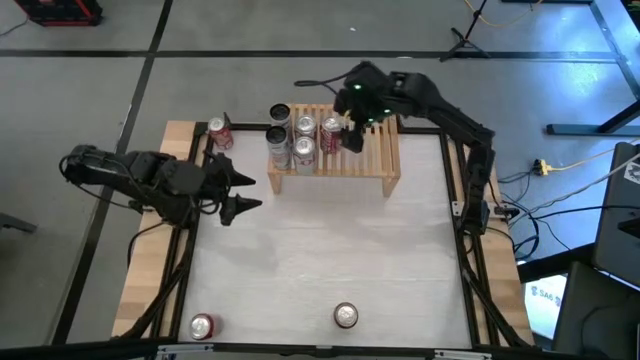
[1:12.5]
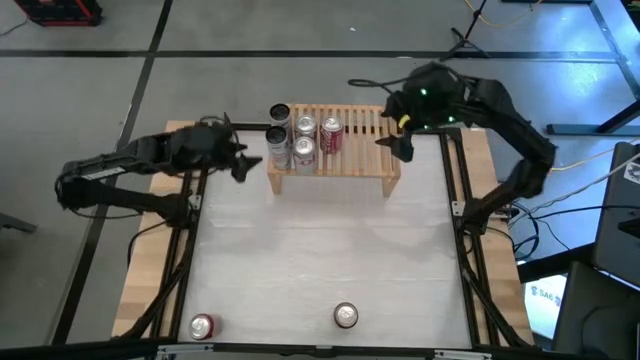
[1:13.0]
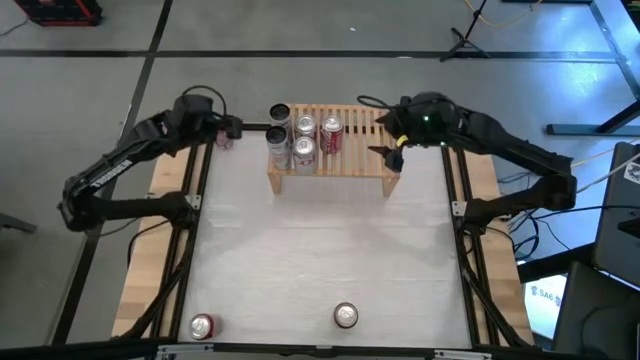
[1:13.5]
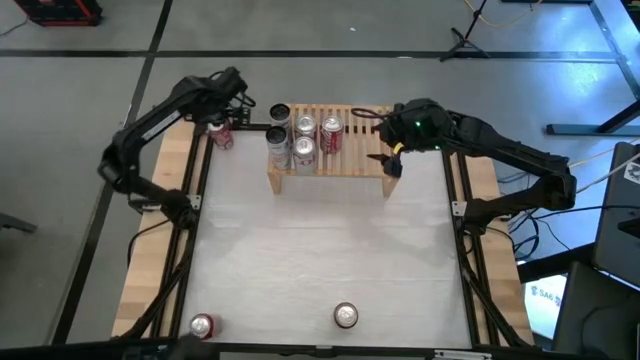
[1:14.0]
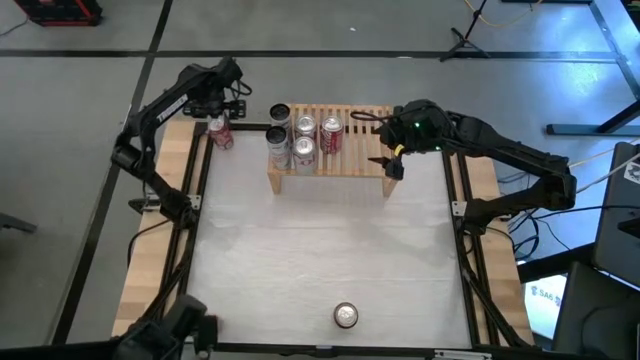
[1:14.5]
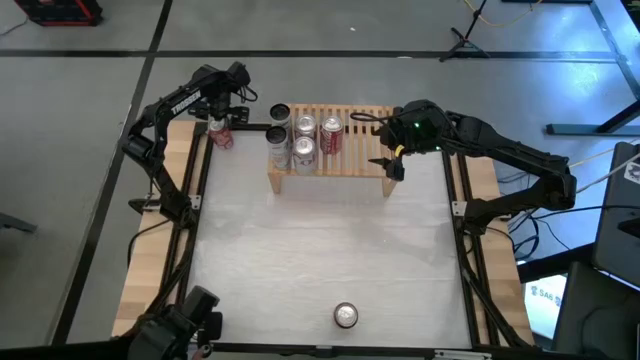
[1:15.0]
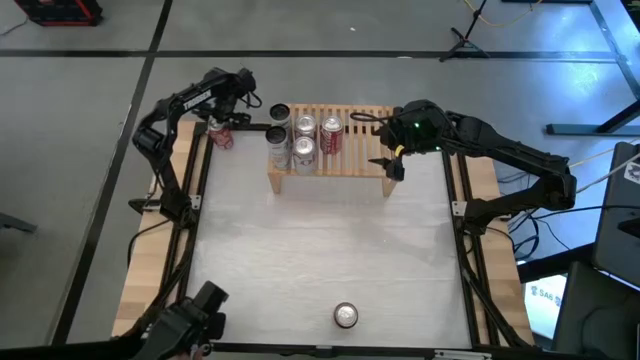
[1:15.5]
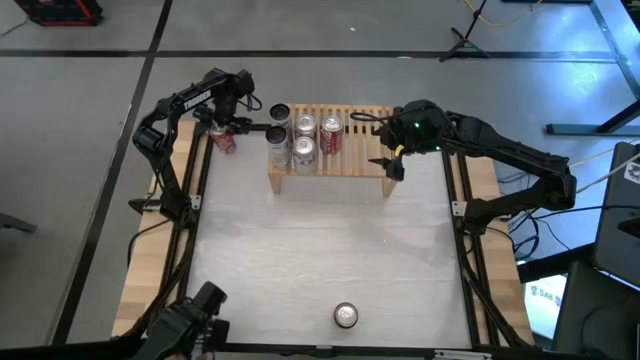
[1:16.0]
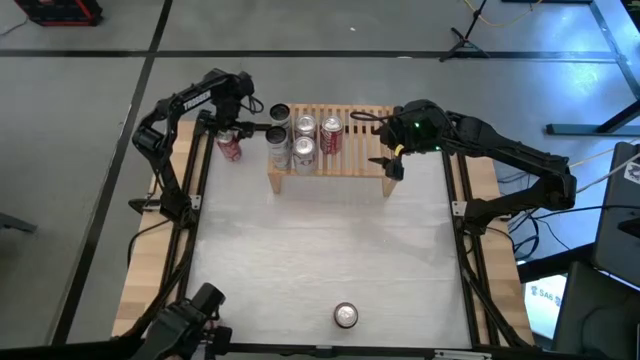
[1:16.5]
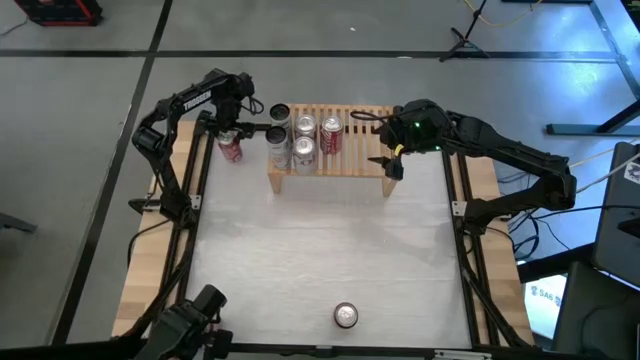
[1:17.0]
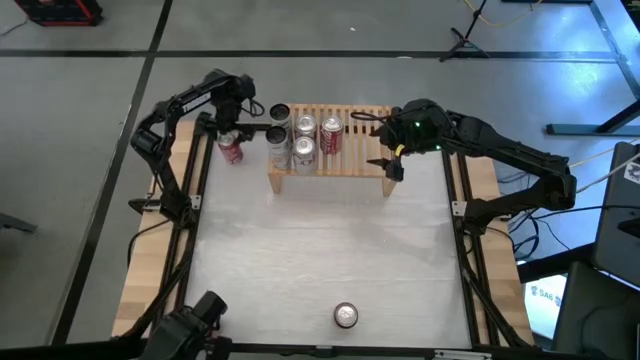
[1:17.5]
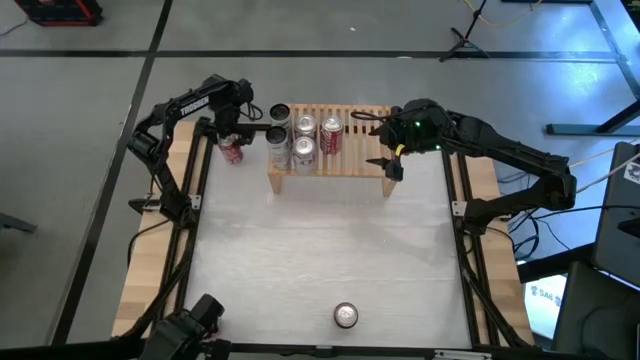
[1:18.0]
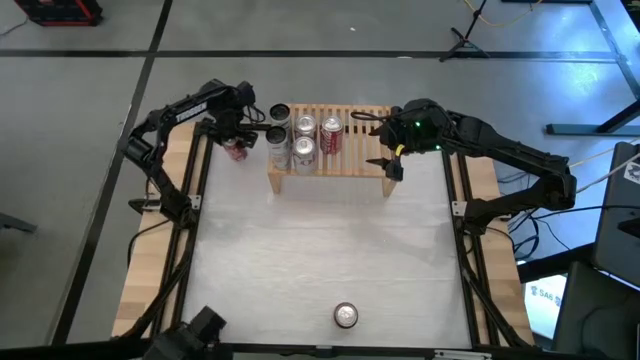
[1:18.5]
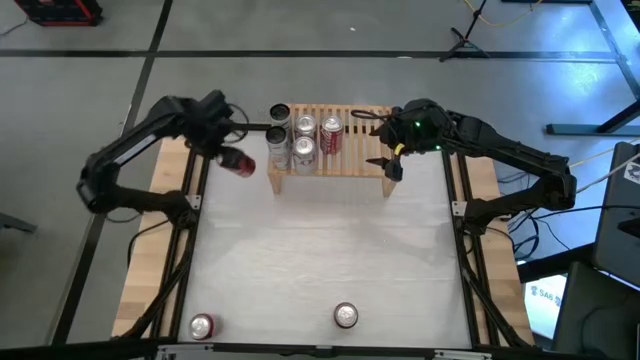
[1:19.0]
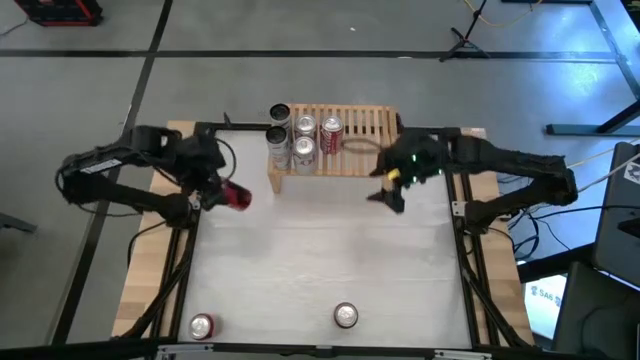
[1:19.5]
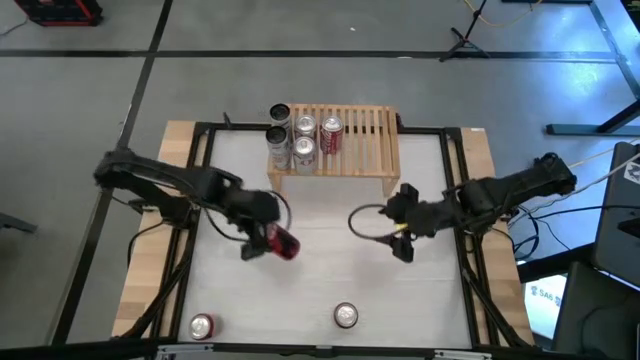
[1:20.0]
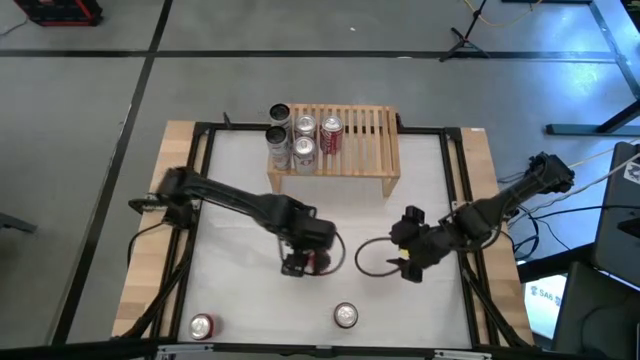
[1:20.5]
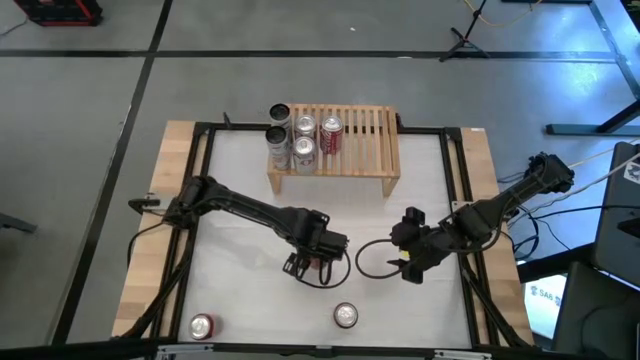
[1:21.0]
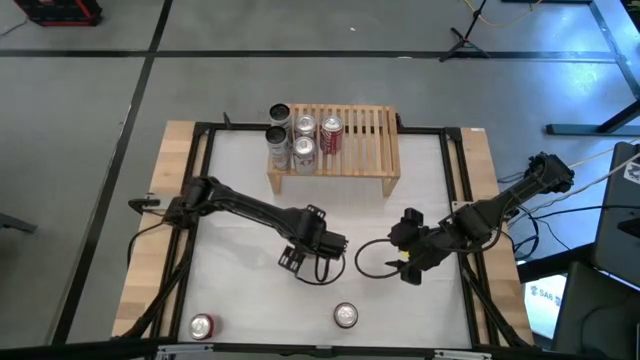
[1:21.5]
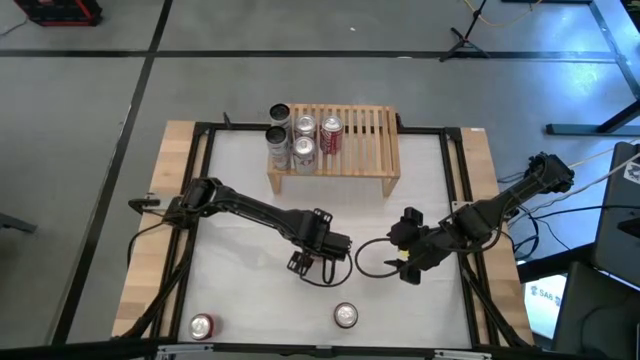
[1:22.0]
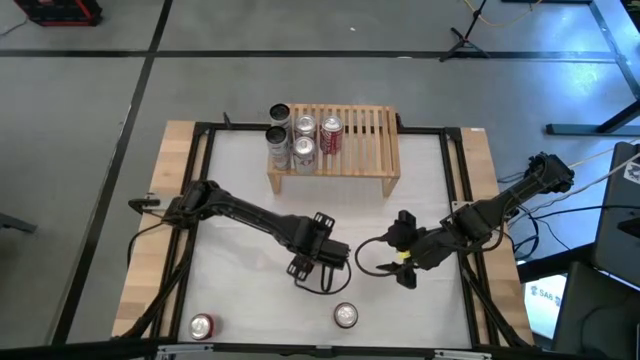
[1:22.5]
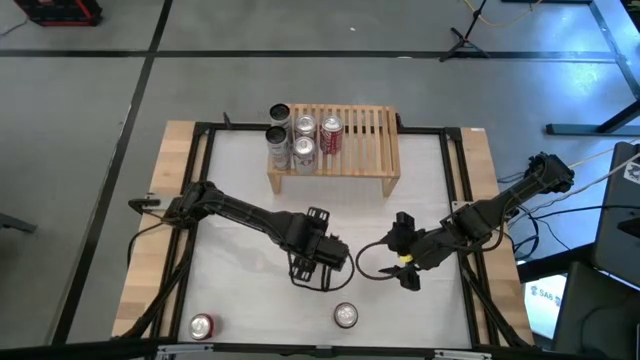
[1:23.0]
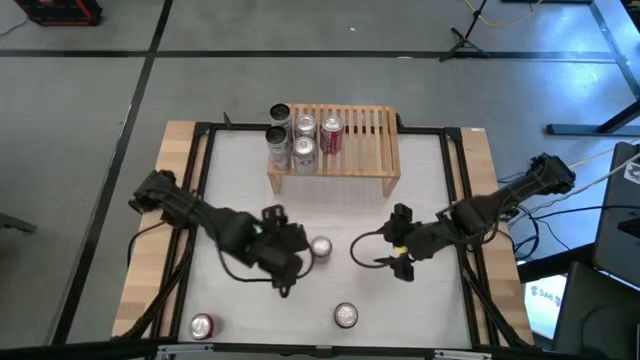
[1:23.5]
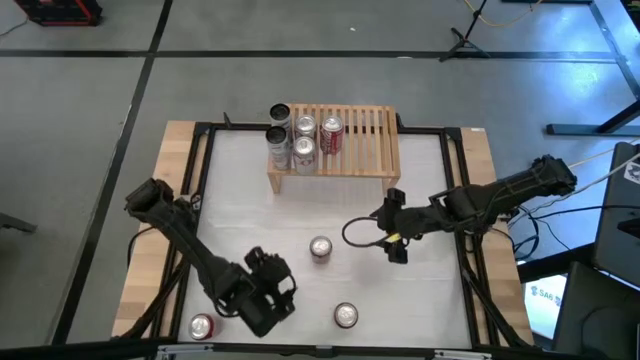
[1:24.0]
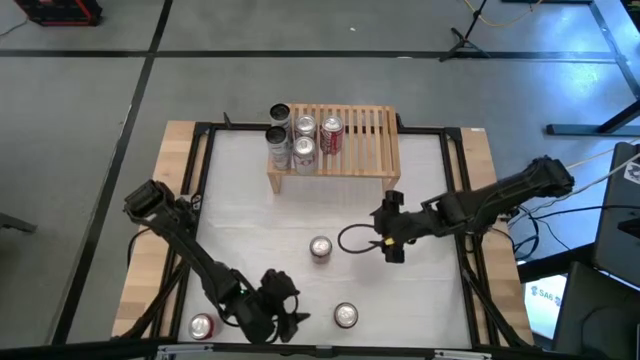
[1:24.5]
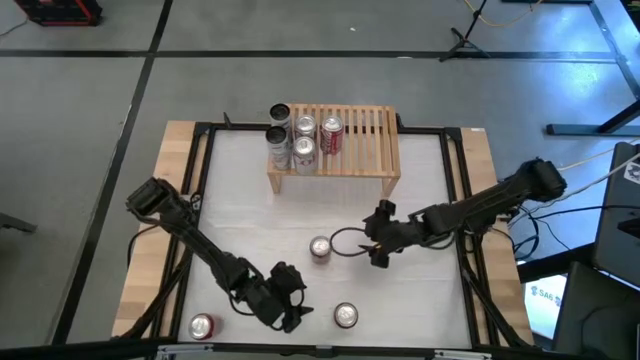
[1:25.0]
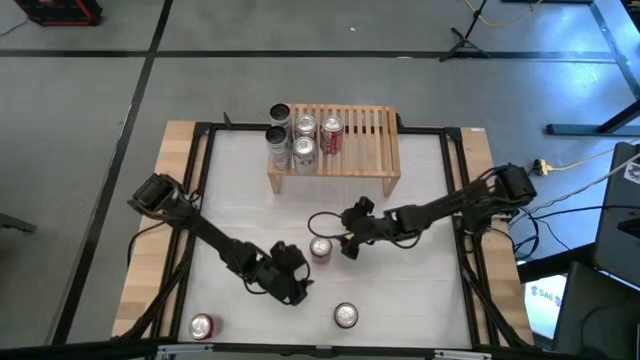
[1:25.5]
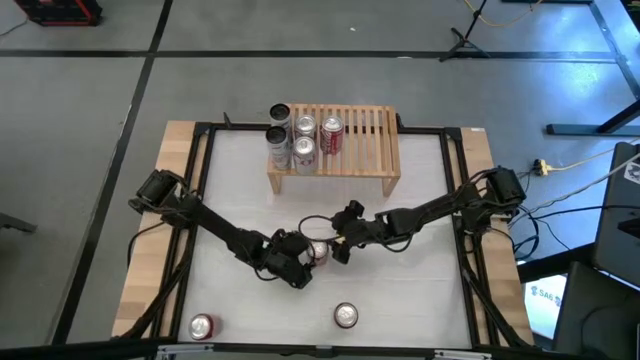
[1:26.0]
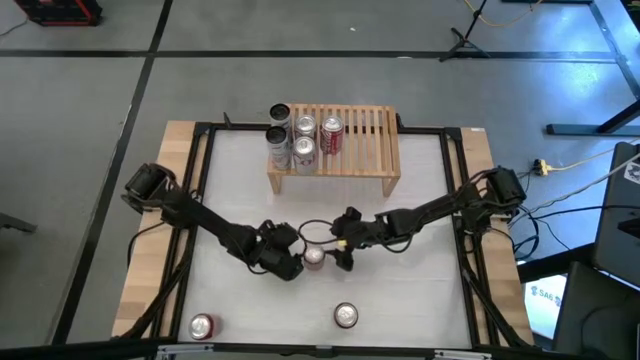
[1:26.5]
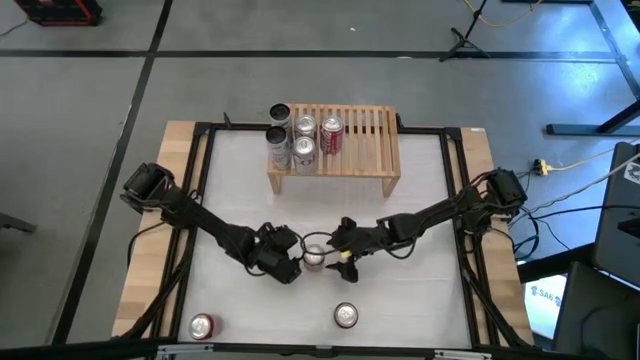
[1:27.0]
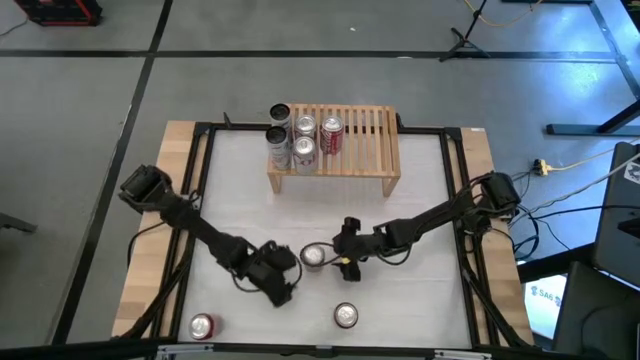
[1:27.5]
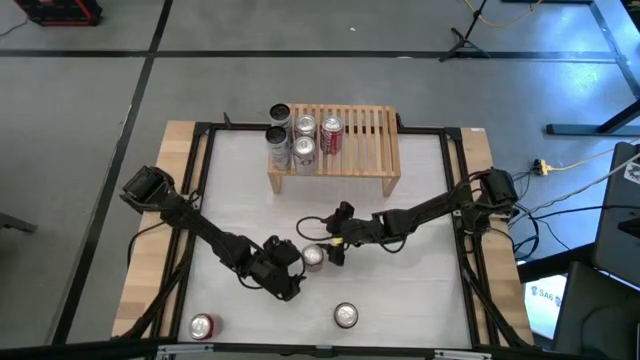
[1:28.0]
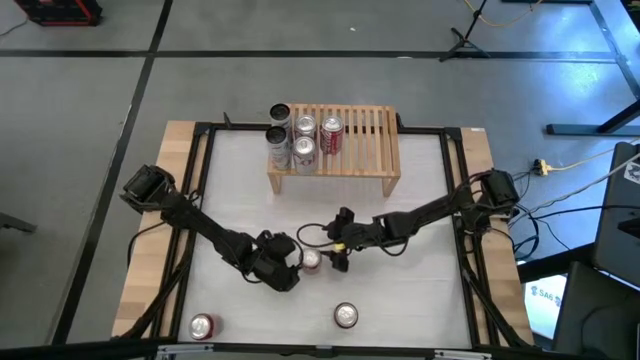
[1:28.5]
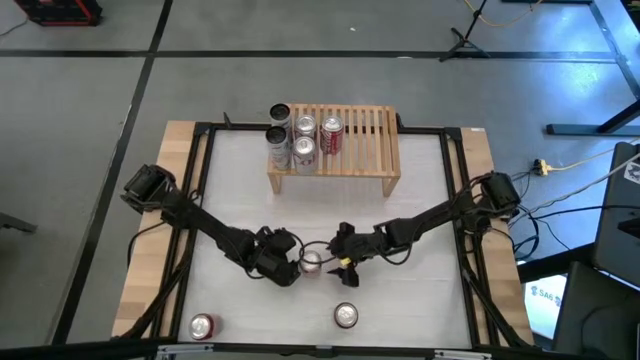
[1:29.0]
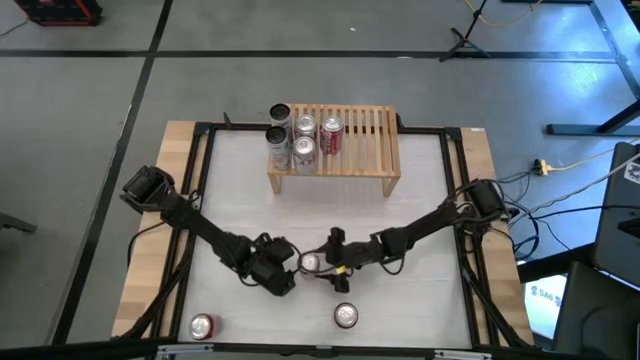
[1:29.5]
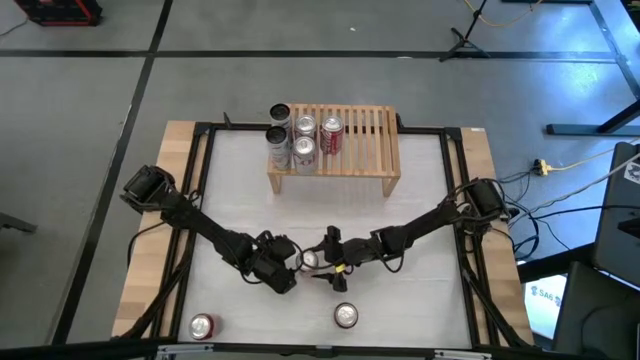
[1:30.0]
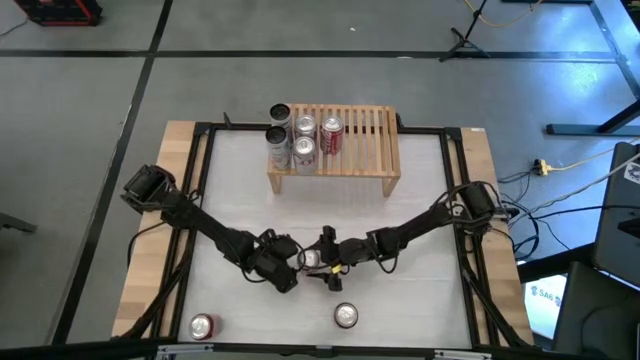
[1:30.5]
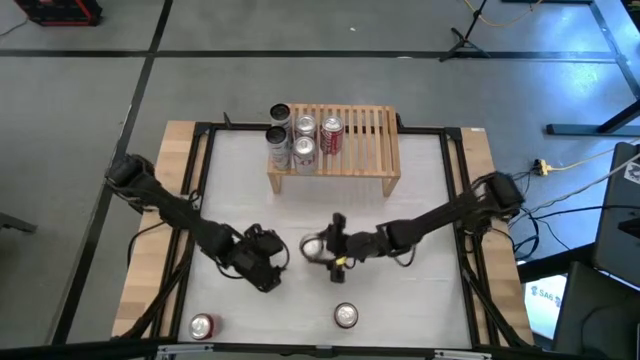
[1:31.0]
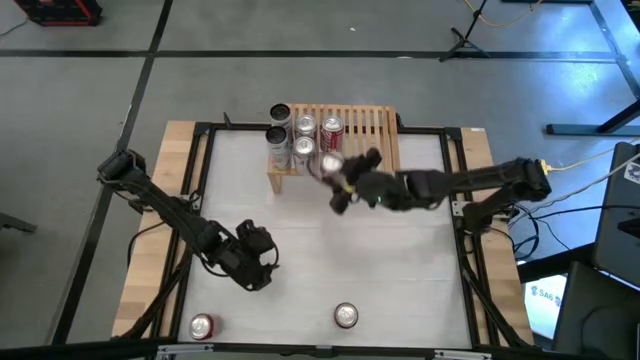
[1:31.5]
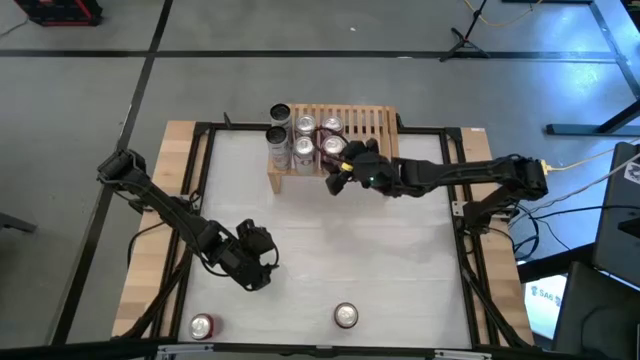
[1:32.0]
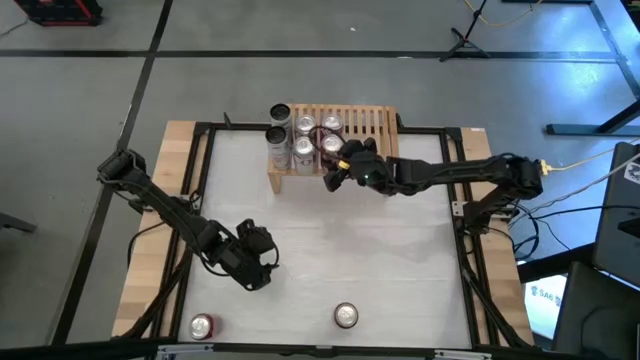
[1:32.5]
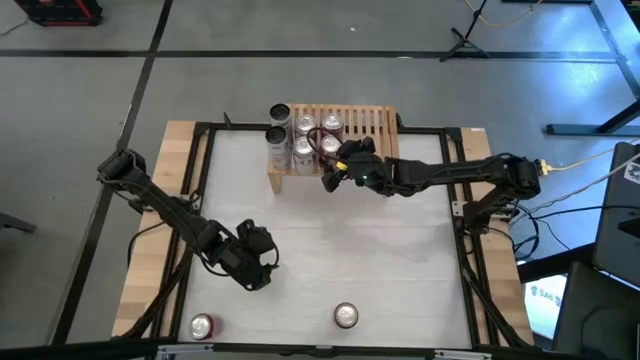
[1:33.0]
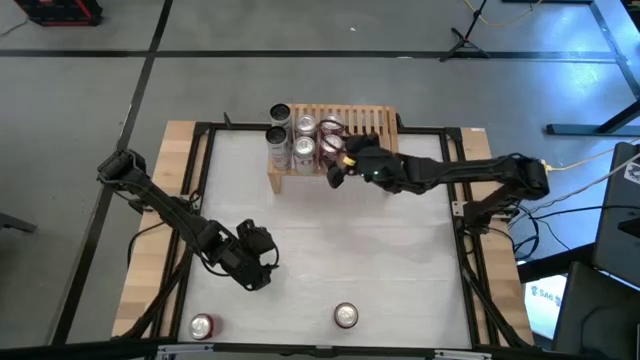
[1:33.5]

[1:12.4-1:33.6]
Task: Place canned beverage on shelf
Put the red soda can on the shelf

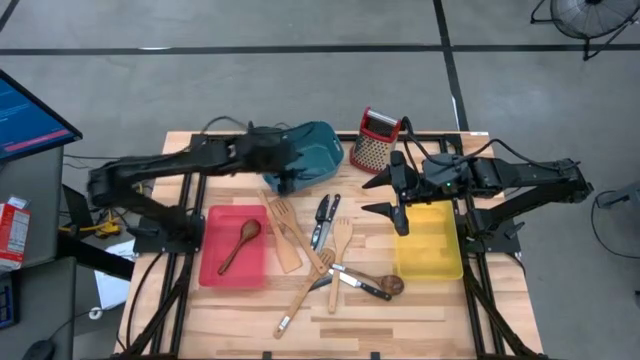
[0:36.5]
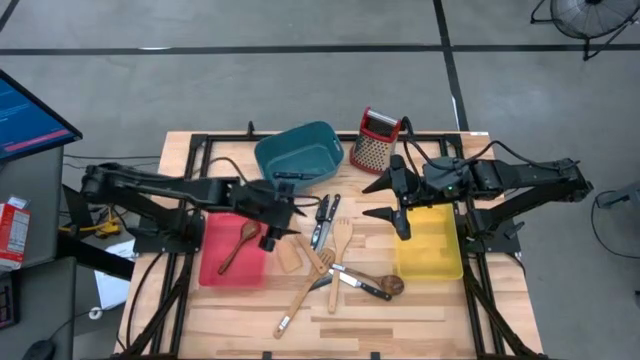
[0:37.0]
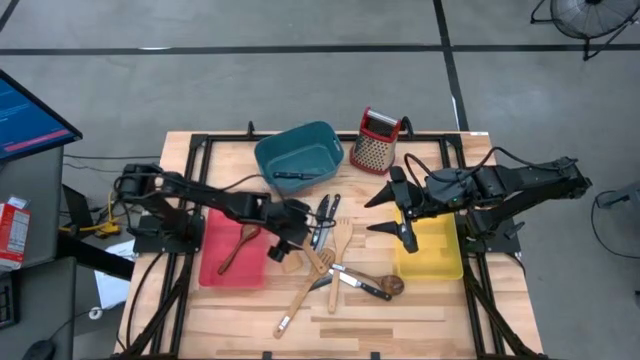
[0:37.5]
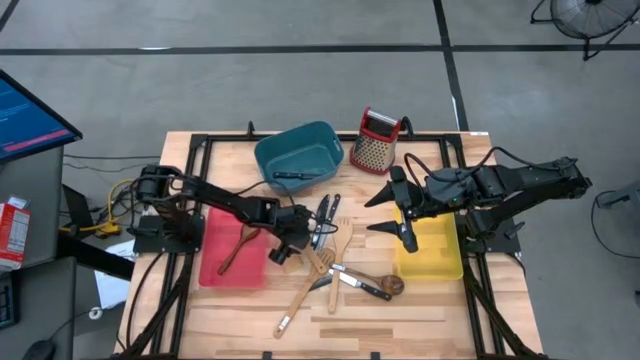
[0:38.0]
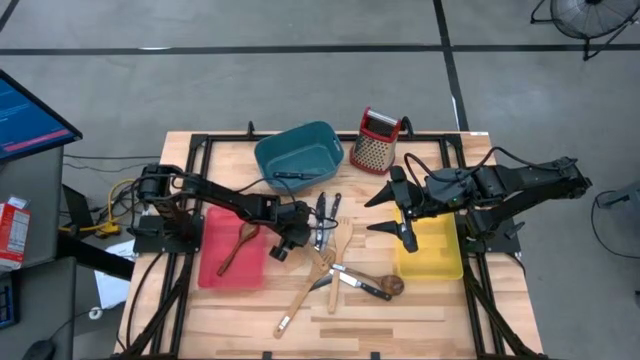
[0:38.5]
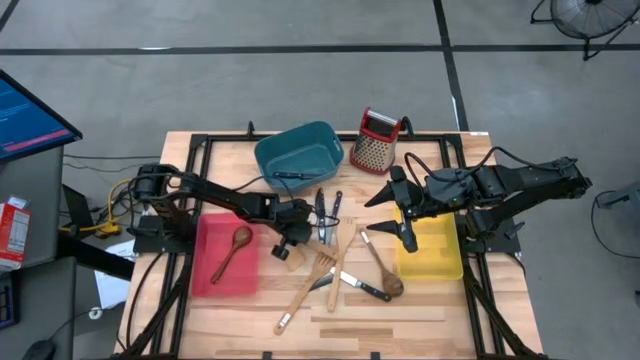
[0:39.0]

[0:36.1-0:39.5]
Task: Pick & Place Kitchen Items
Put the brown spatula into the yellow bin
